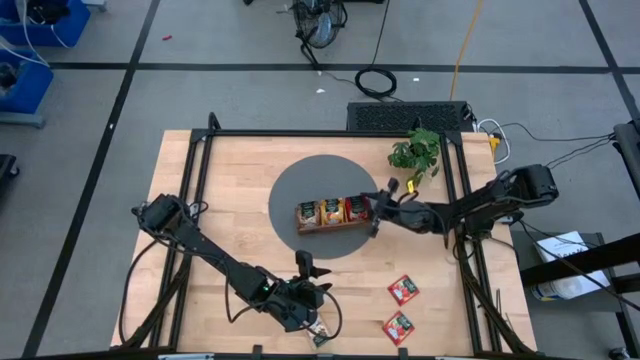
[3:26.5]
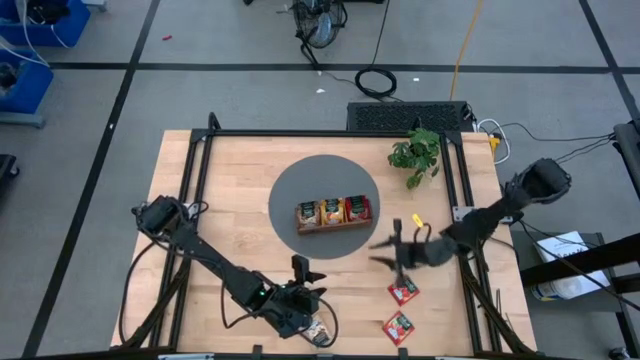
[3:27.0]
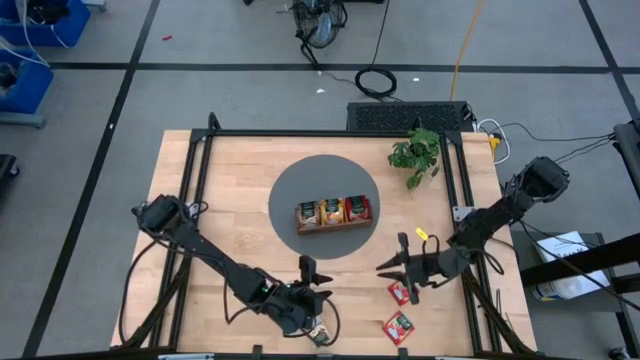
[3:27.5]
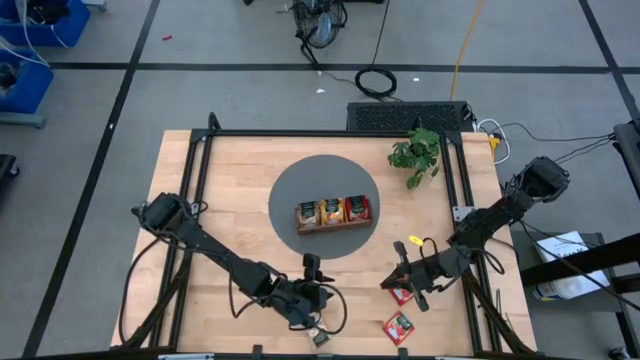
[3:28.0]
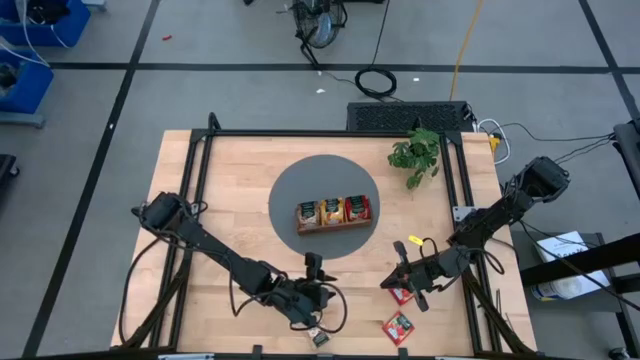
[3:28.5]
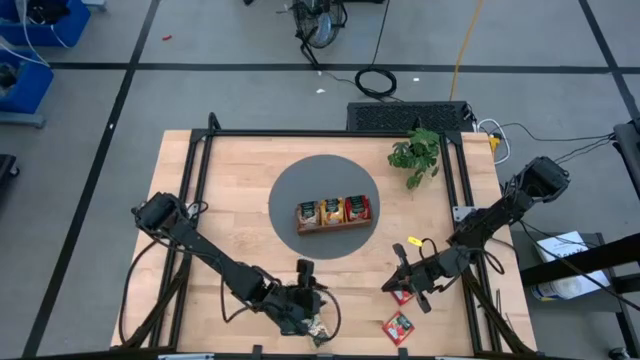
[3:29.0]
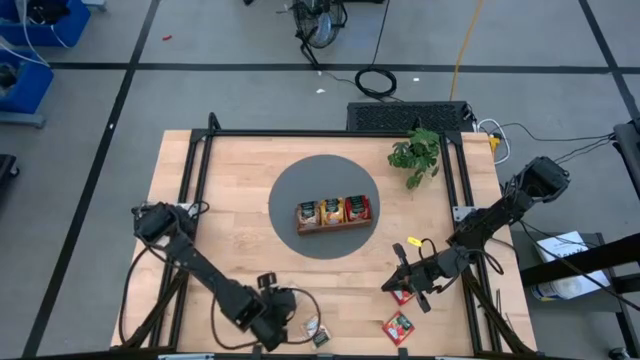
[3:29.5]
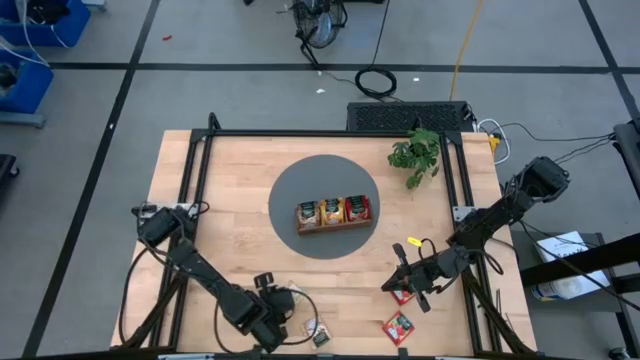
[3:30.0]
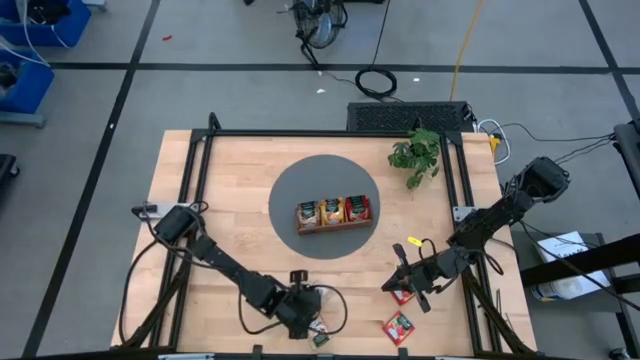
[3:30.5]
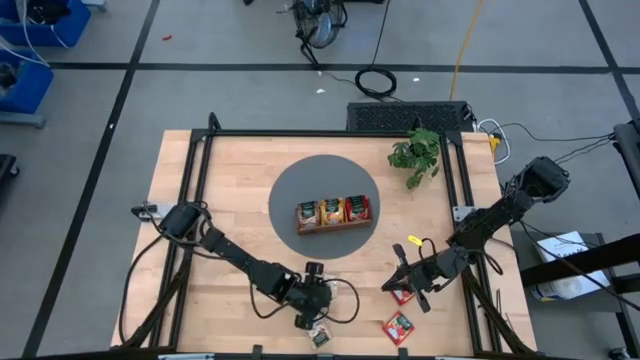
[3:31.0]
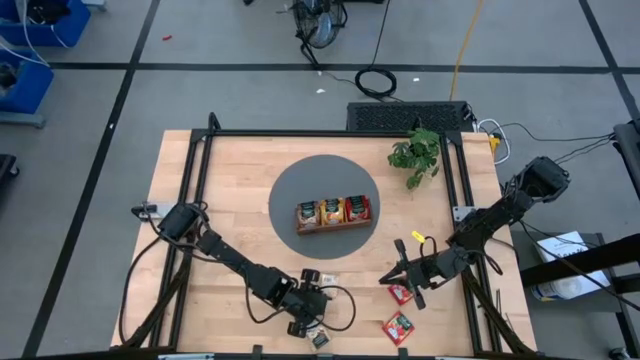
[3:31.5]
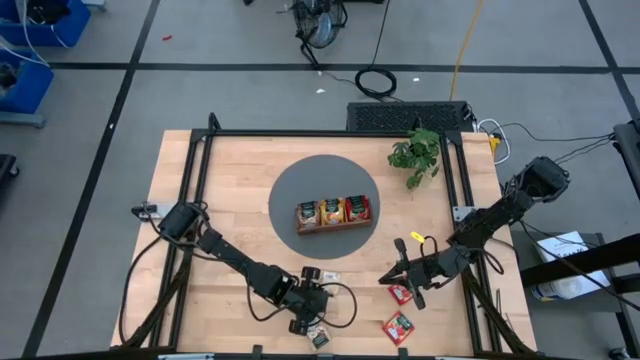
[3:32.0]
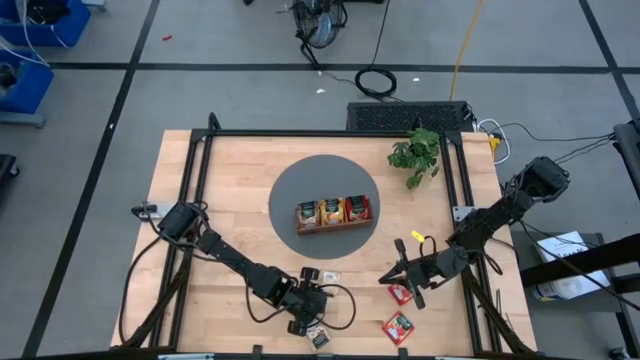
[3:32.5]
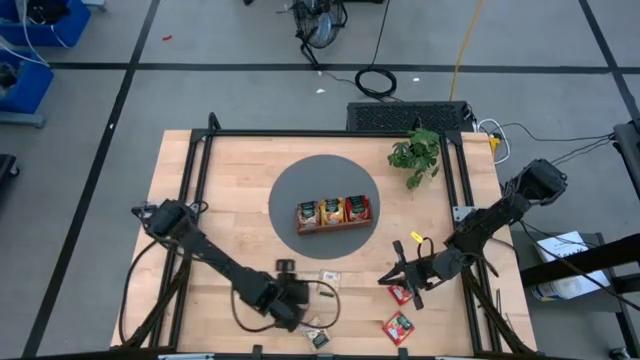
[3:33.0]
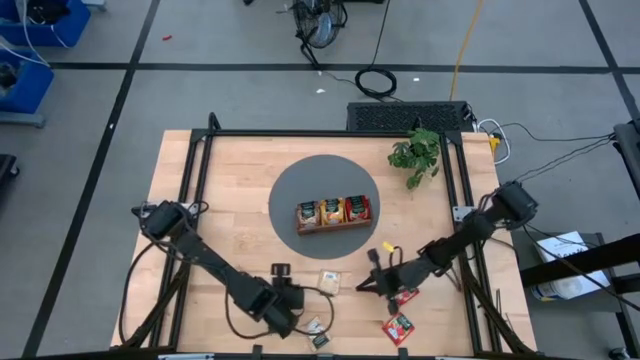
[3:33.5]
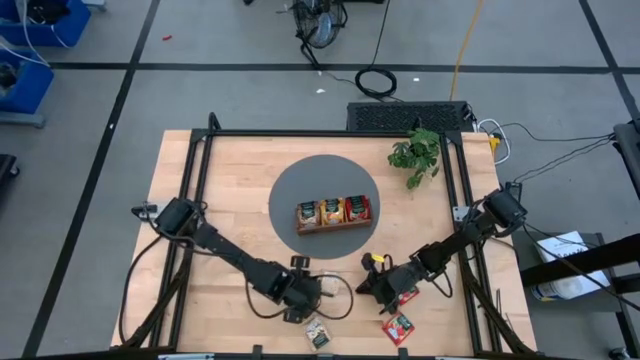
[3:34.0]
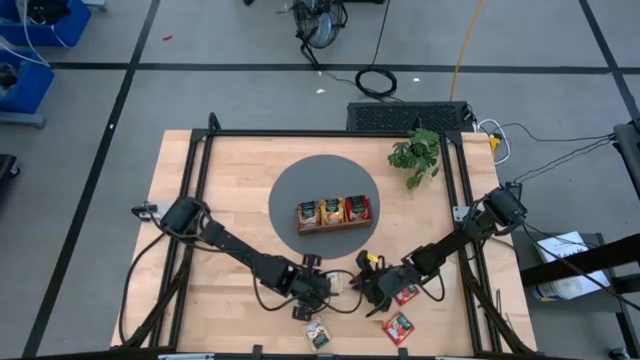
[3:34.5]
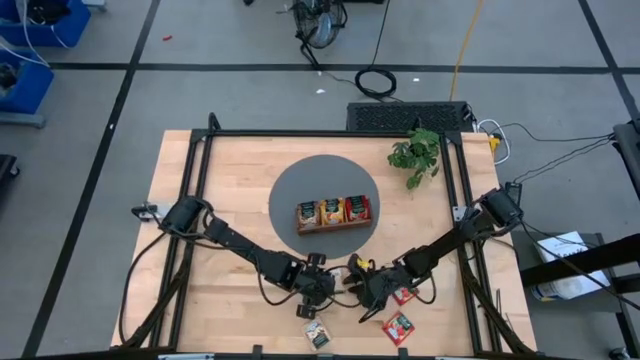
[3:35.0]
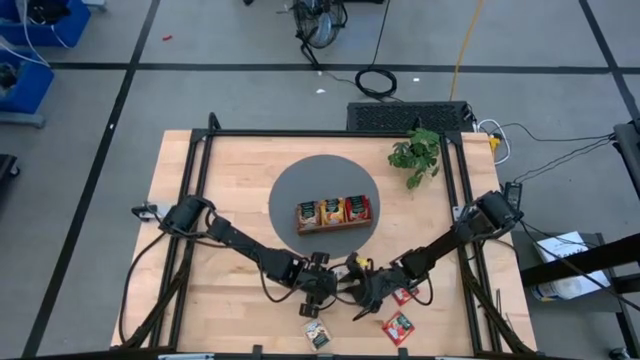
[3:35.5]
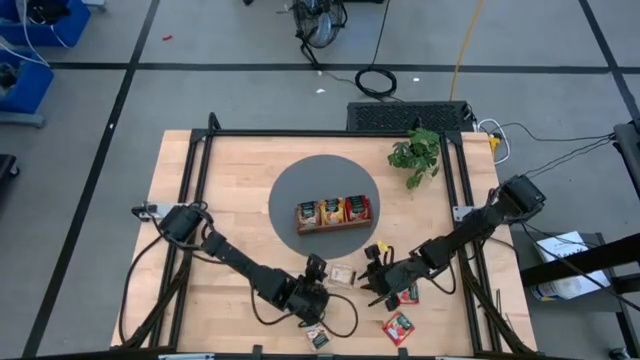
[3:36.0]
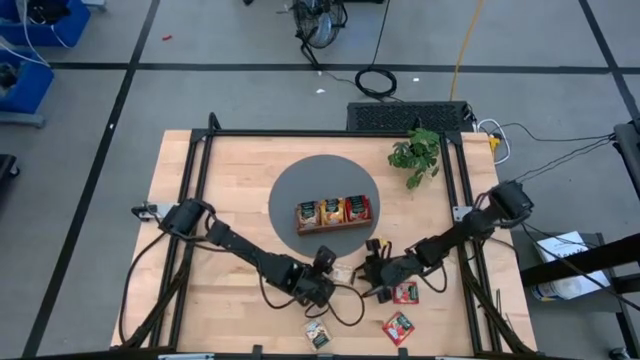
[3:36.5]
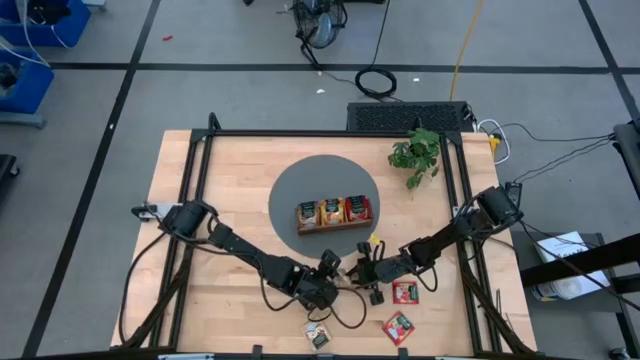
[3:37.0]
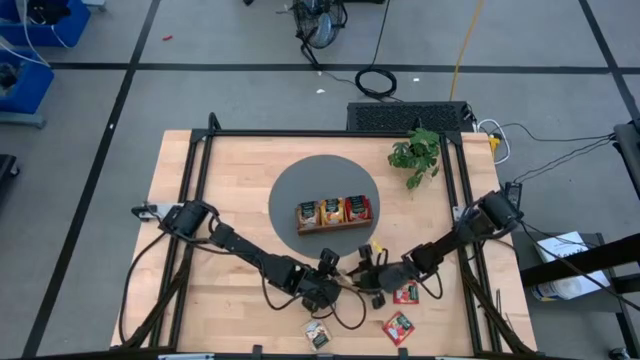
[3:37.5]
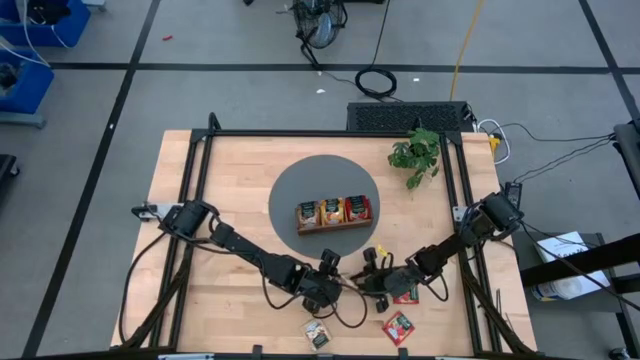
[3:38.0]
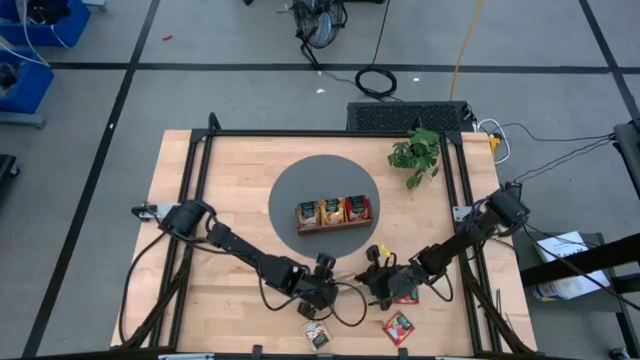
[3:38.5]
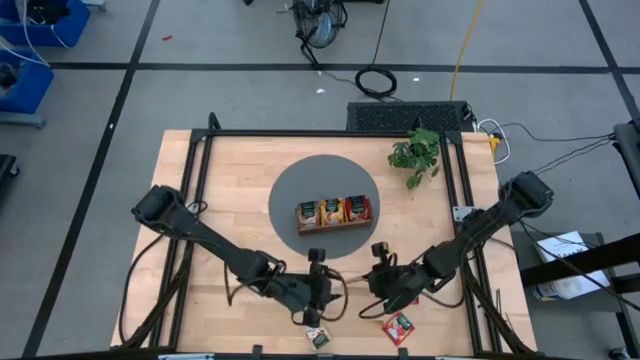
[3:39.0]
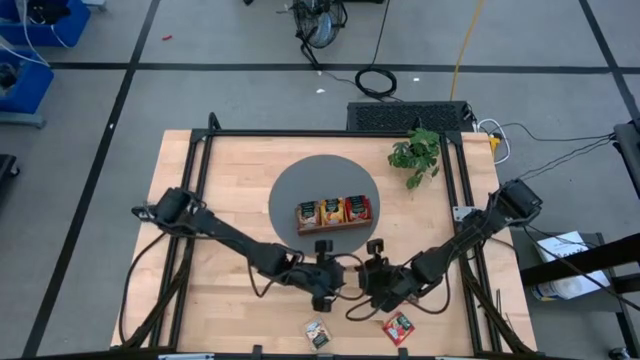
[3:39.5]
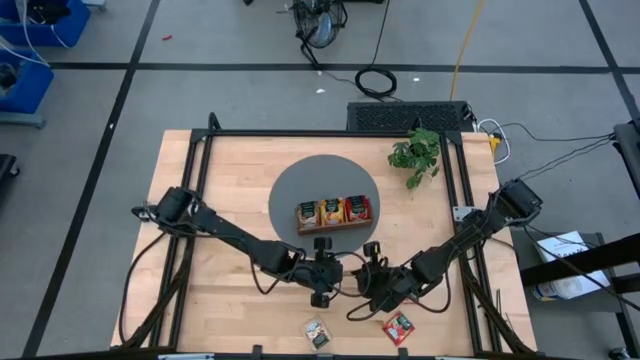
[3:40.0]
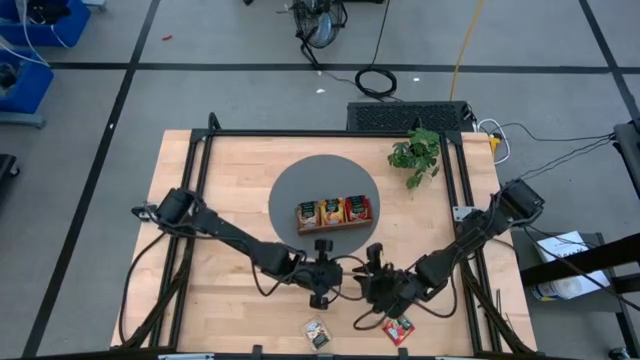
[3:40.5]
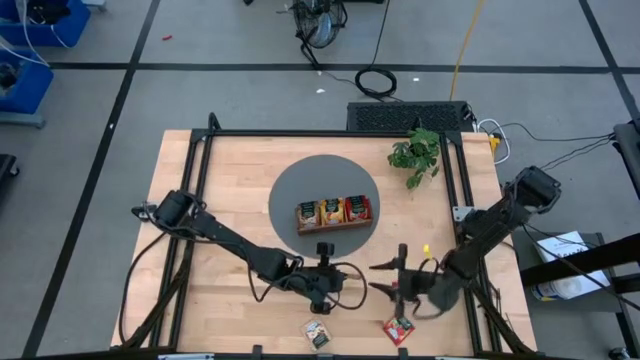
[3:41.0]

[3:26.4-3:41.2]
Task: Pick & Place Tea
Put the brown tea bag into the left section of the wooden organizer

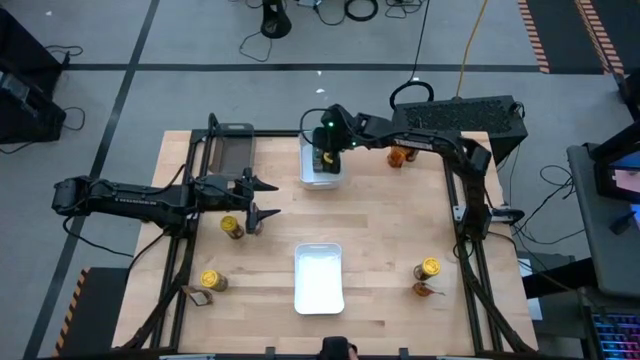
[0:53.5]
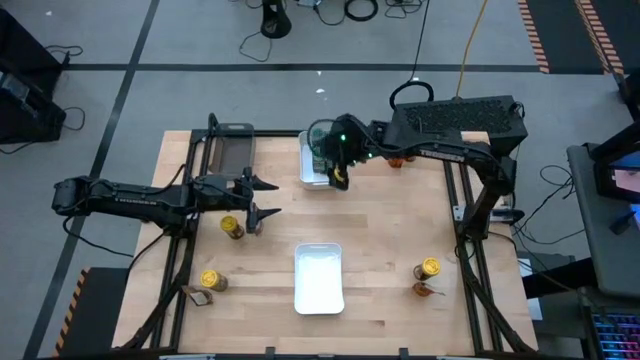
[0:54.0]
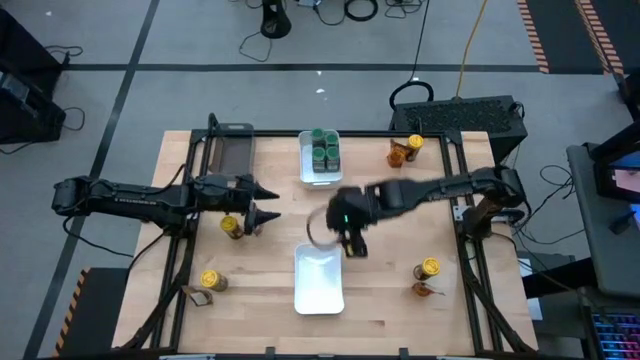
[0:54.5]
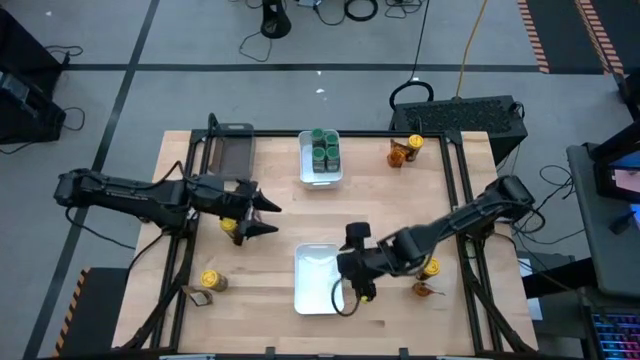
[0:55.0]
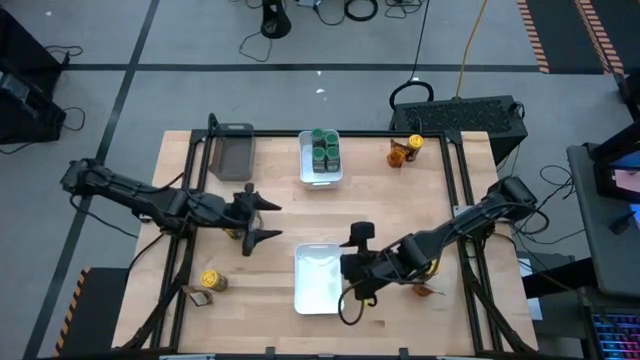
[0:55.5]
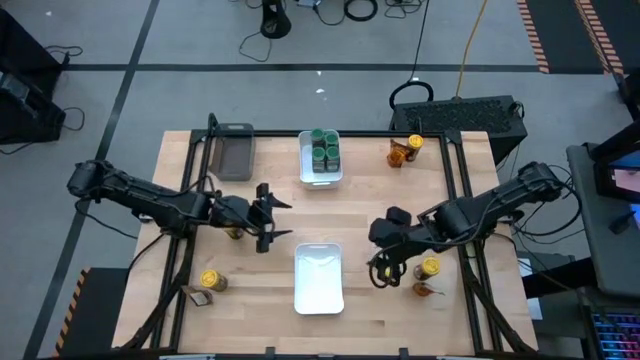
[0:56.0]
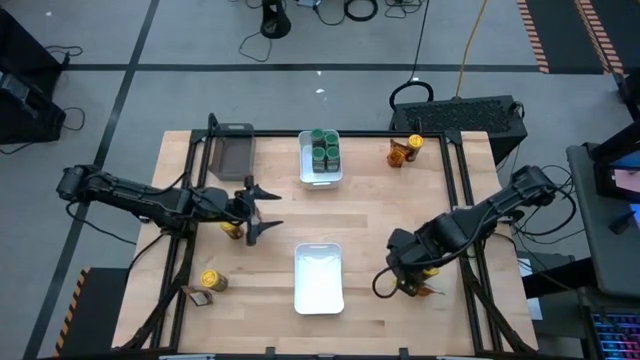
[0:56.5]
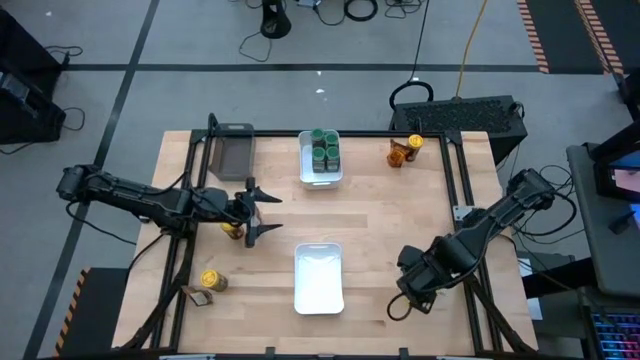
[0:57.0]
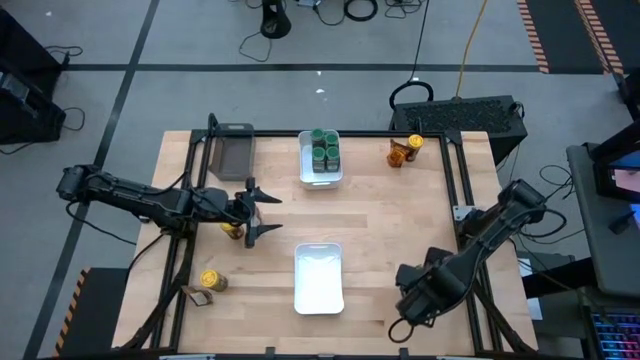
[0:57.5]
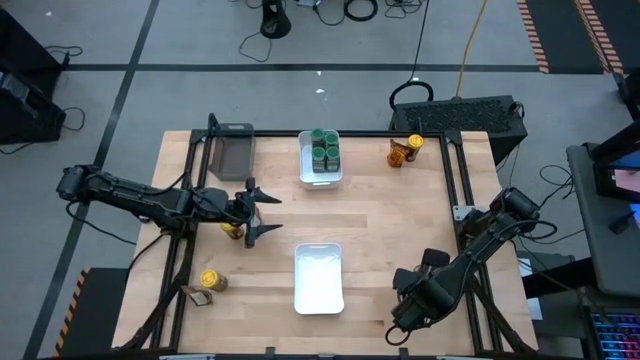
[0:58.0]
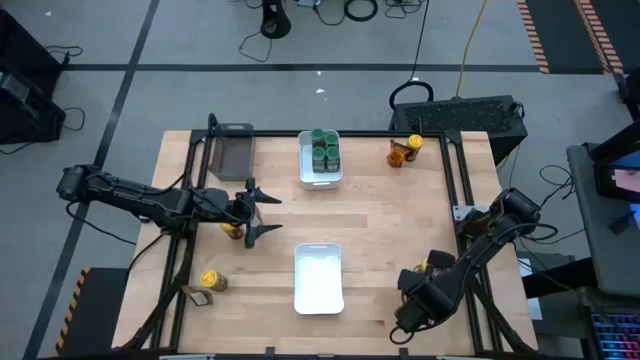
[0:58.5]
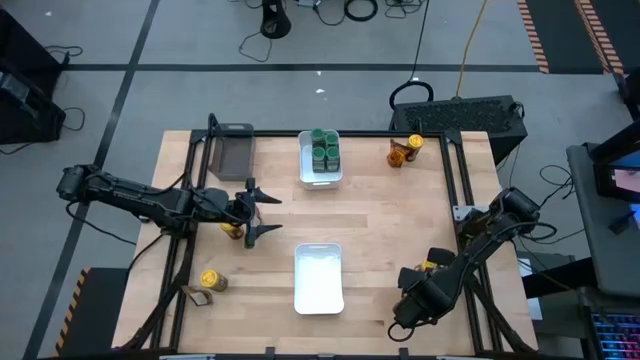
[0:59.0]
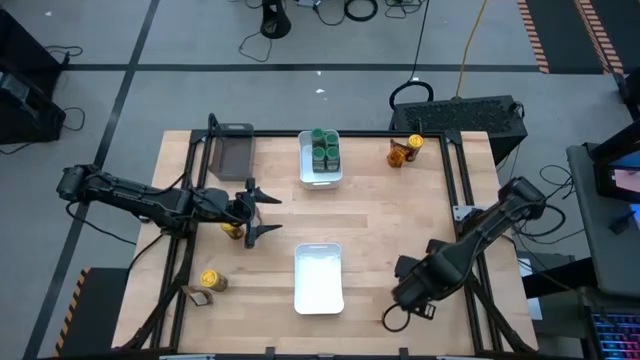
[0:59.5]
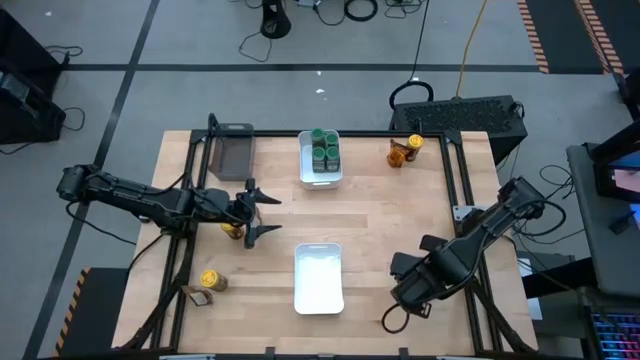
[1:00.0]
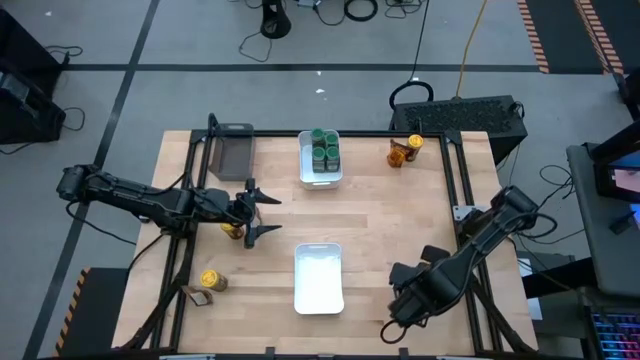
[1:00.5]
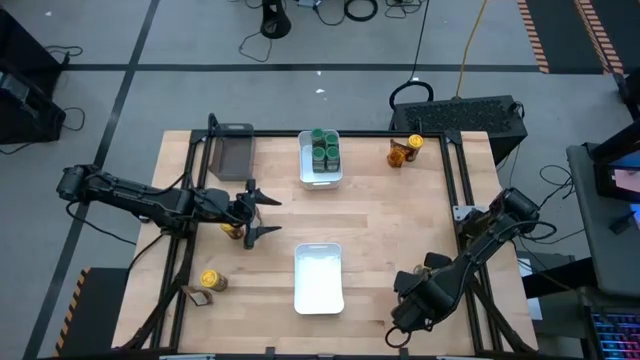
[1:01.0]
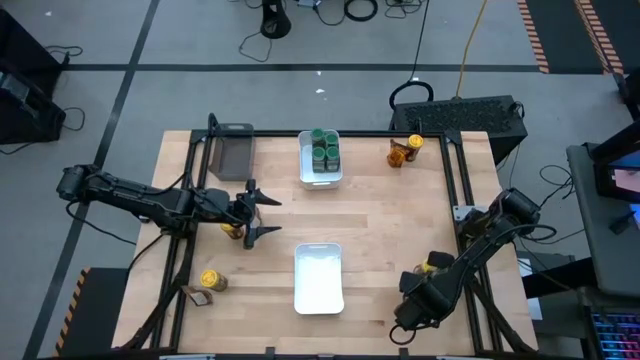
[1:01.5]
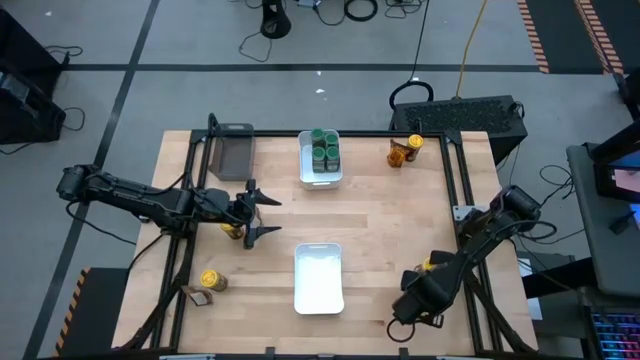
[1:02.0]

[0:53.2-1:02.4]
Task: Sort spices by type
Put the bottom right brown spice pack into the bottom white bin
